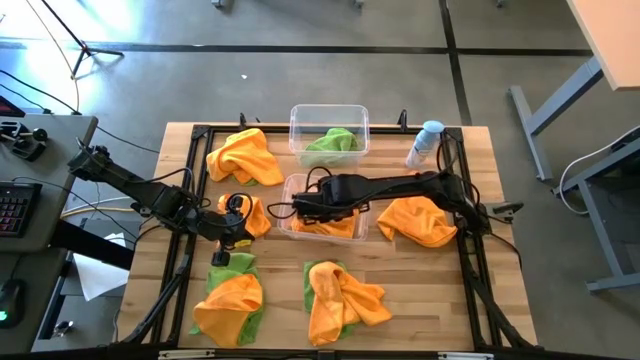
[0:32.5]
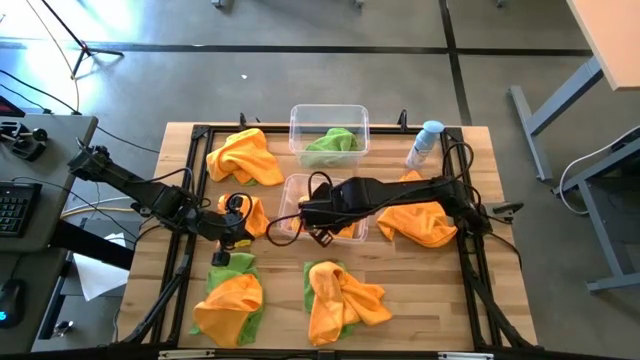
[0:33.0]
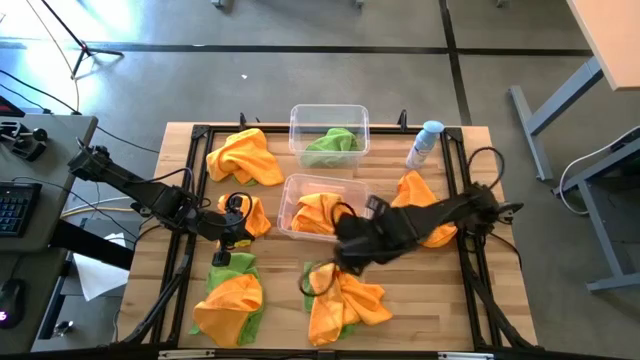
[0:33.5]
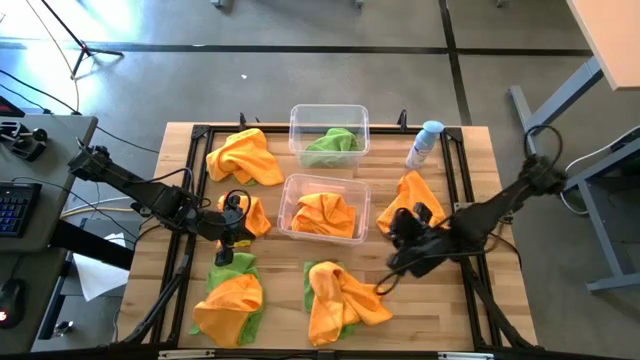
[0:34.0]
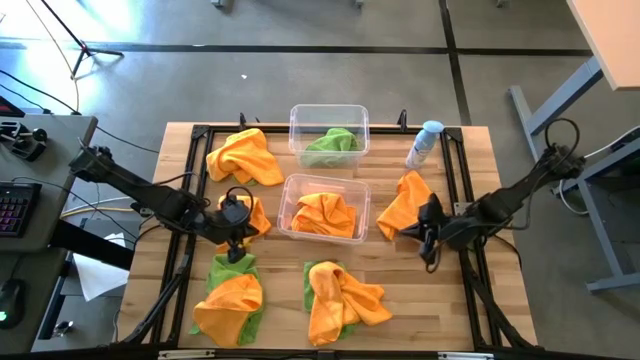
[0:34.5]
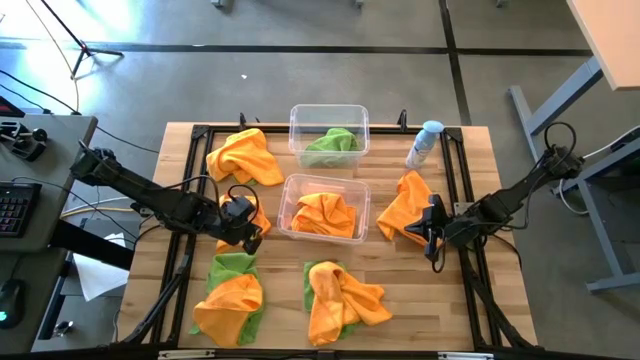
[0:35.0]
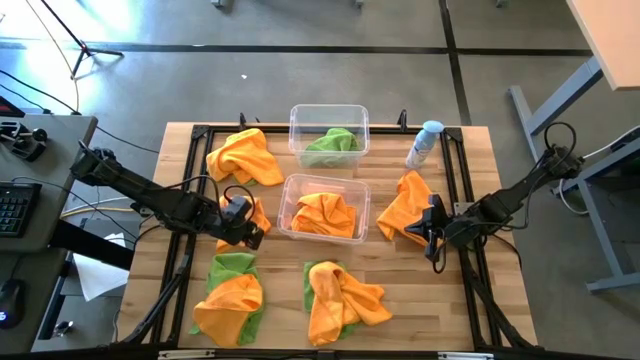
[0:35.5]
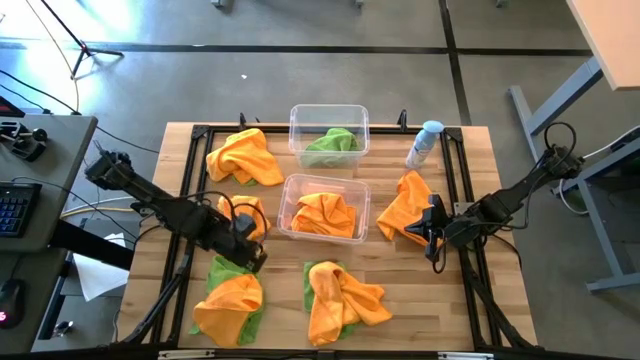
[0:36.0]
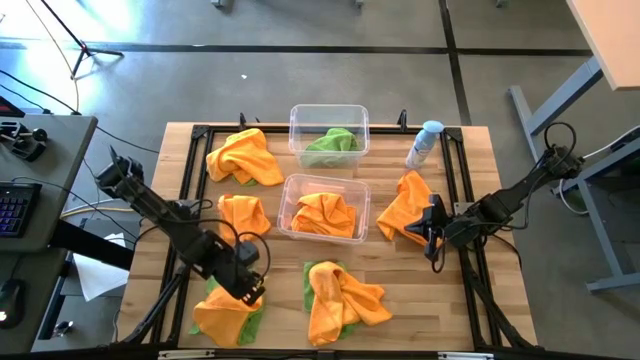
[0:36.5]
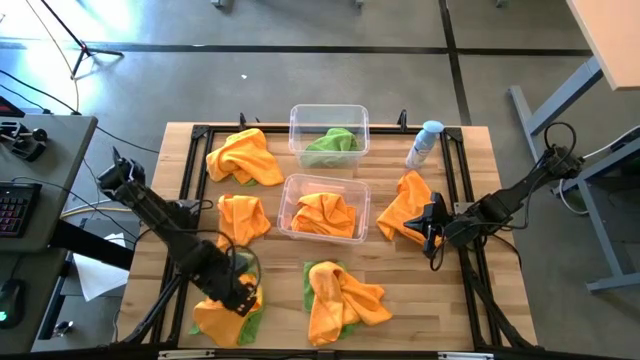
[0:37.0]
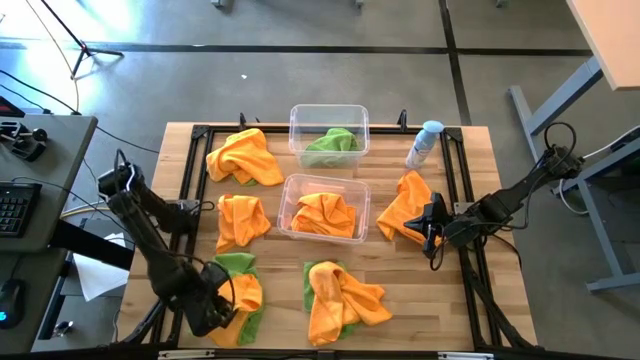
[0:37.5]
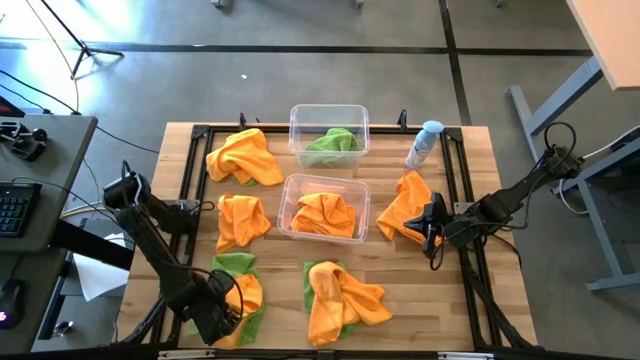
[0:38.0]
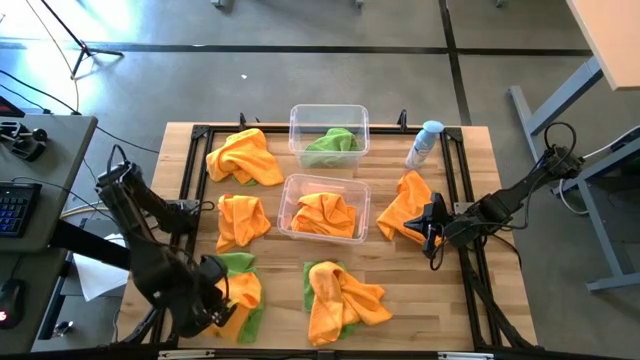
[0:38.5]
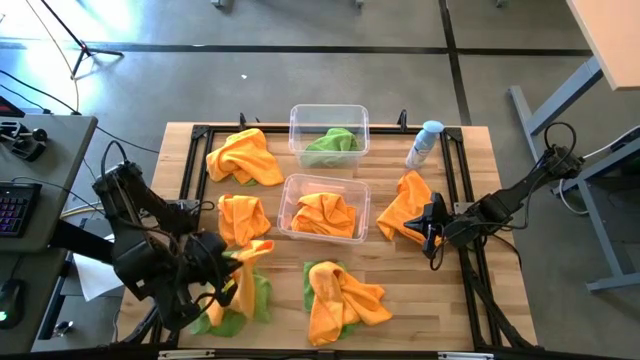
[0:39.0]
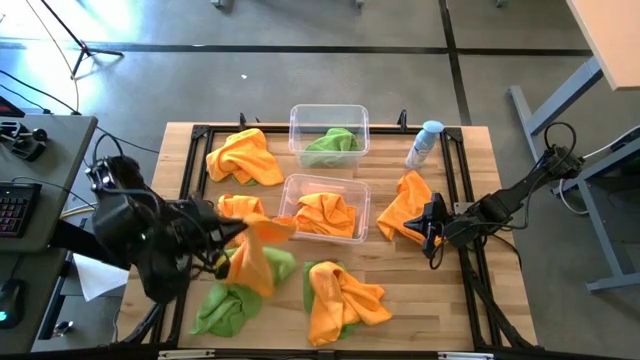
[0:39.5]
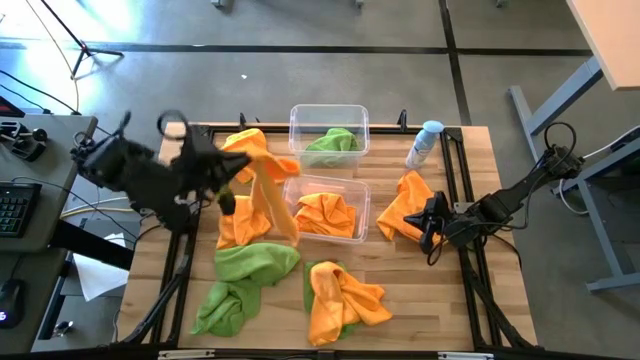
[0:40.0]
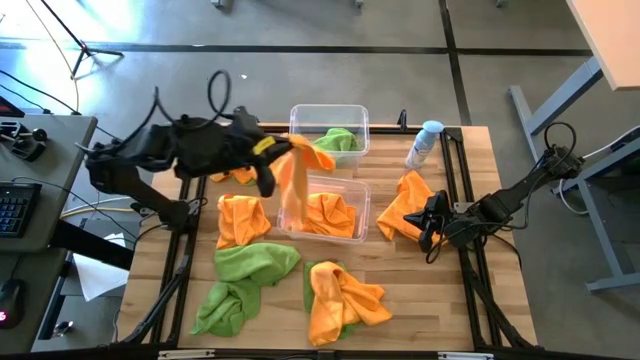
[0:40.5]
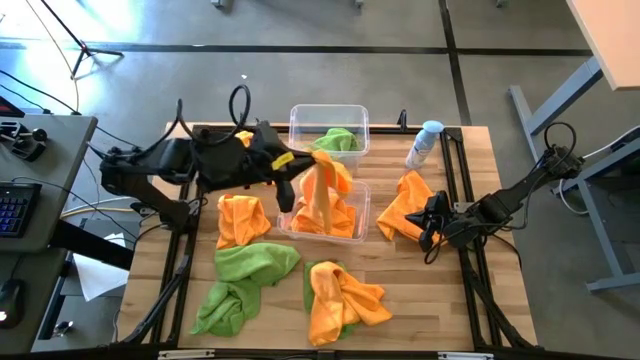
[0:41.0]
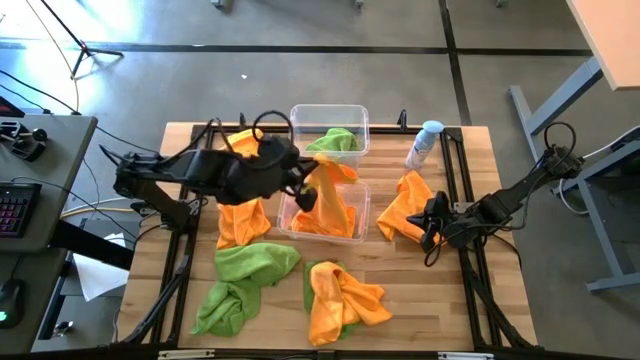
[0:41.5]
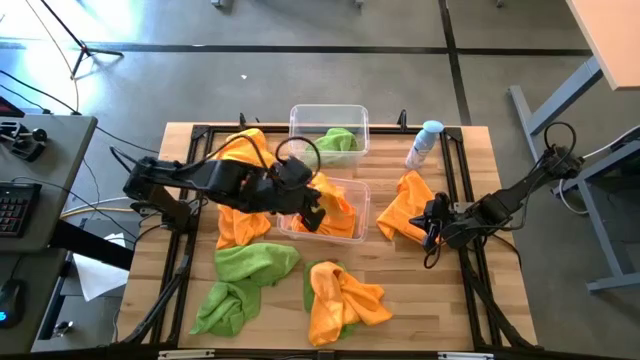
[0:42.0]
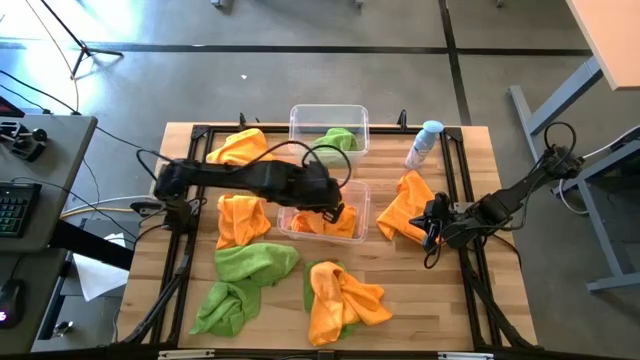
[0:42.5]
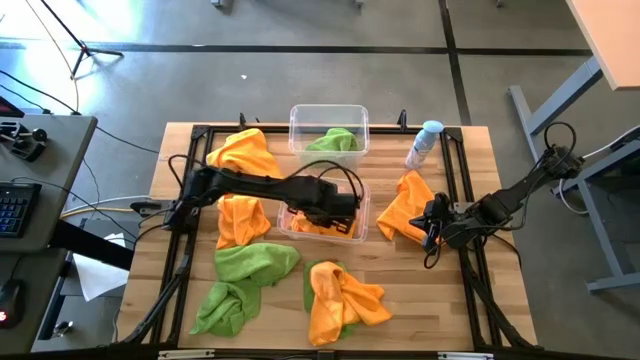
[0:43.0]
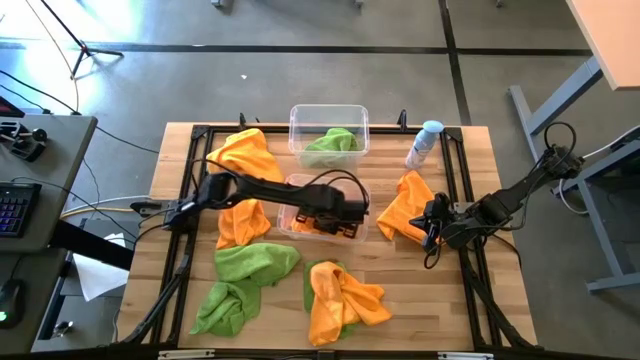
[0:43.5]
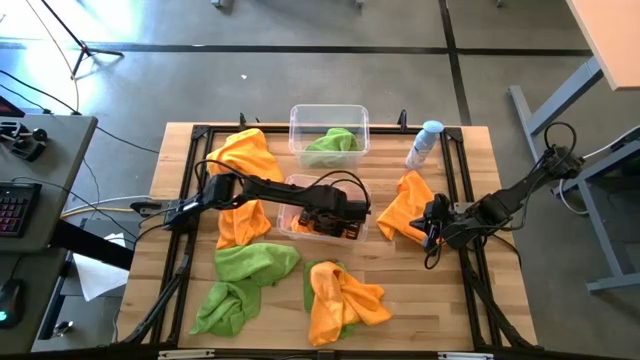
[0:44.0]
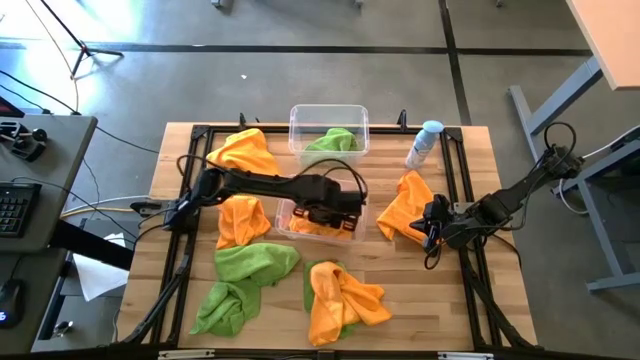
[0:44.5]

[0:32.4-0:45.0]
Task: Sort microfiber towel by color & place in baskets
Put the orange microfiber towel into the bottom transparent bin

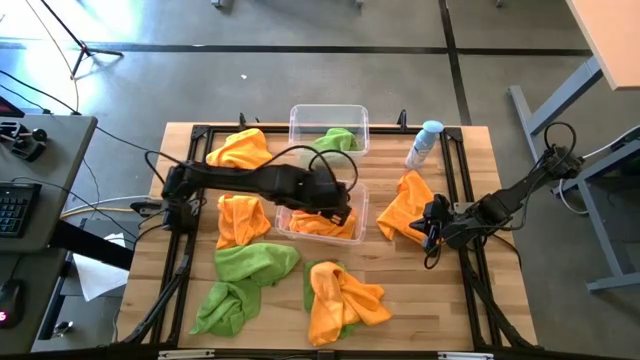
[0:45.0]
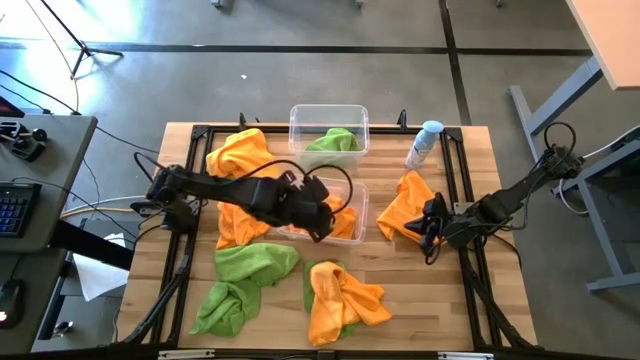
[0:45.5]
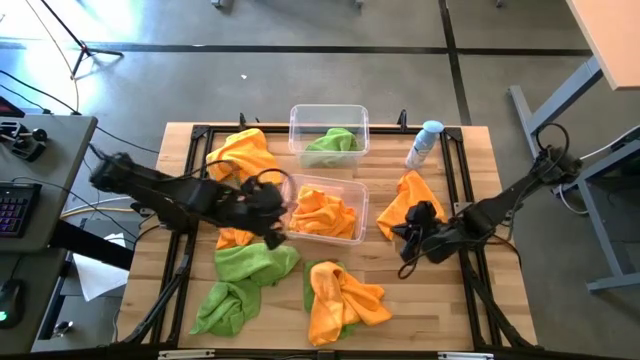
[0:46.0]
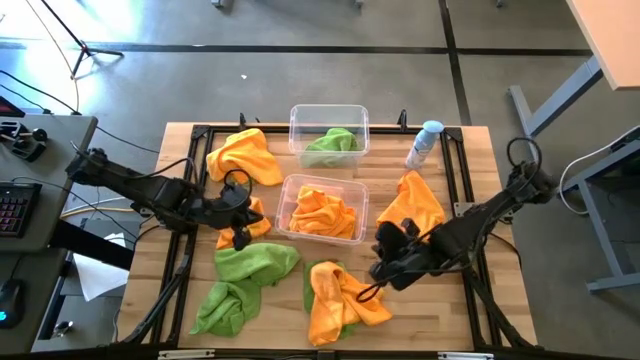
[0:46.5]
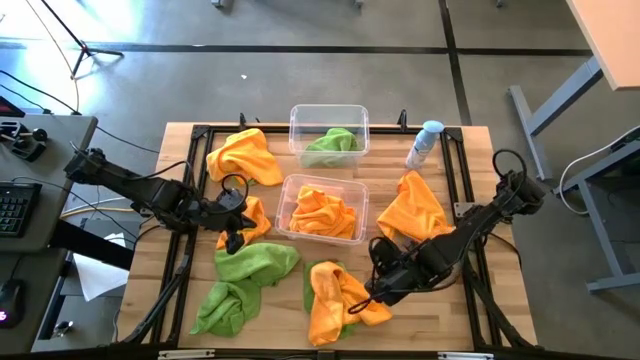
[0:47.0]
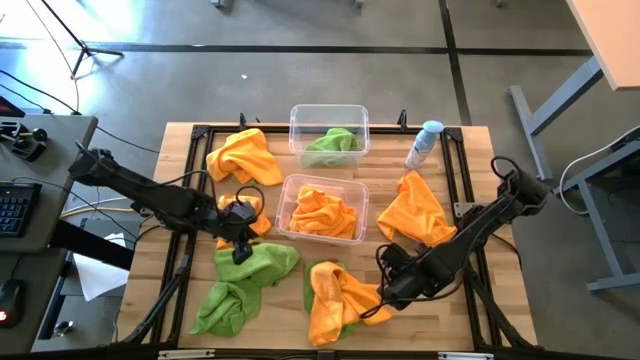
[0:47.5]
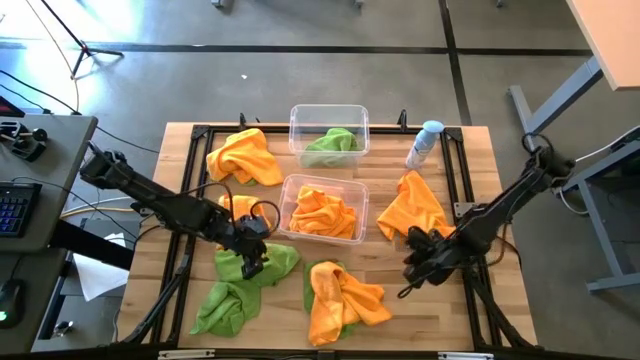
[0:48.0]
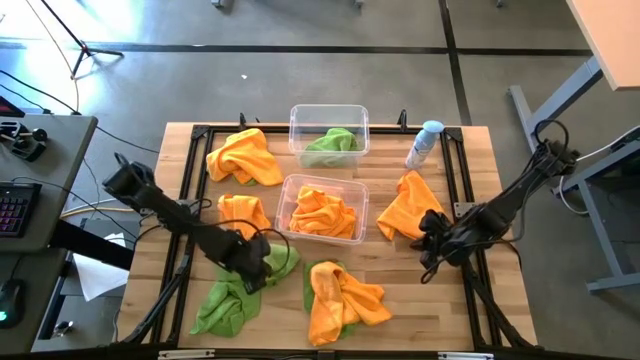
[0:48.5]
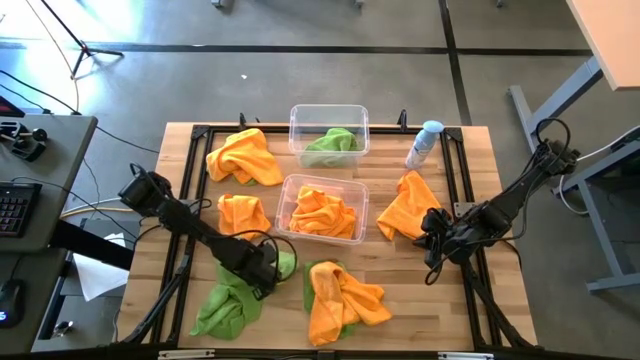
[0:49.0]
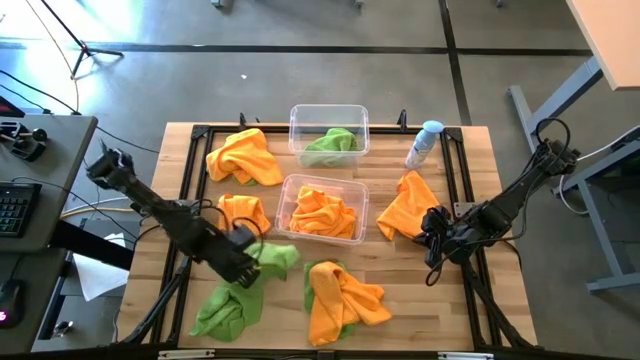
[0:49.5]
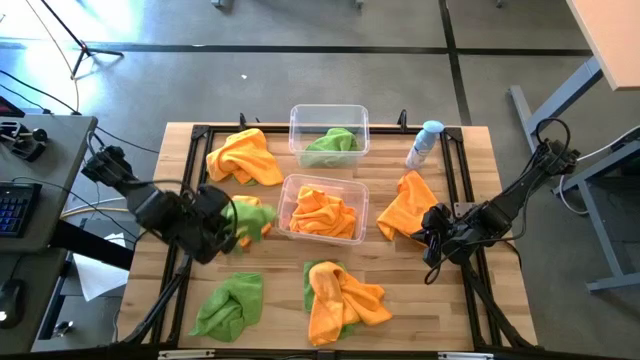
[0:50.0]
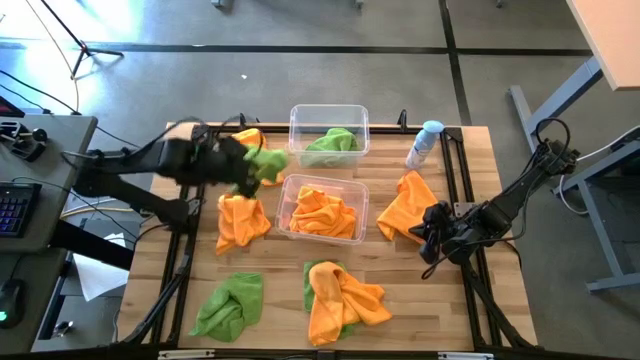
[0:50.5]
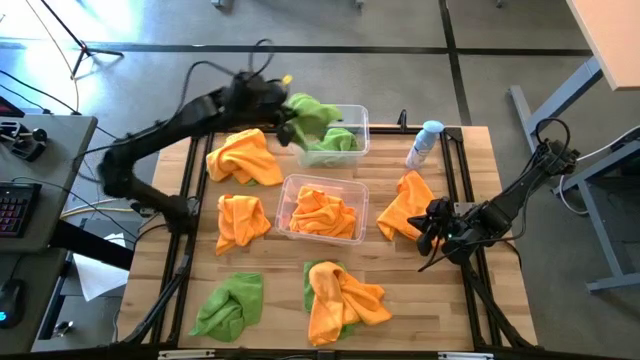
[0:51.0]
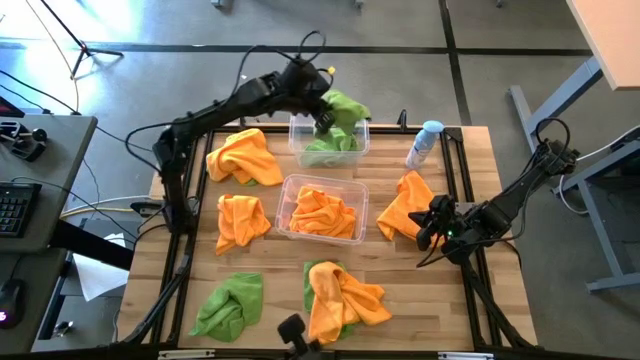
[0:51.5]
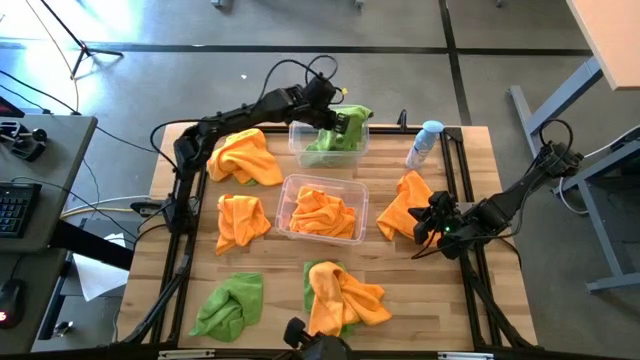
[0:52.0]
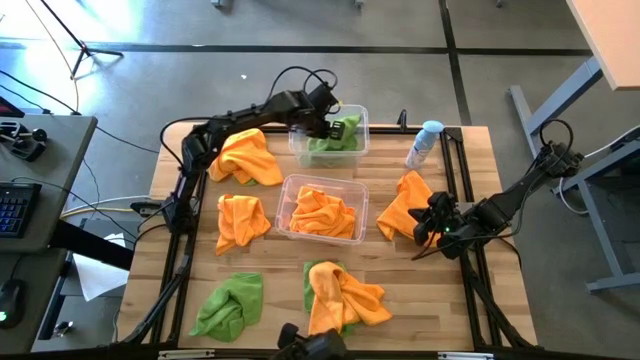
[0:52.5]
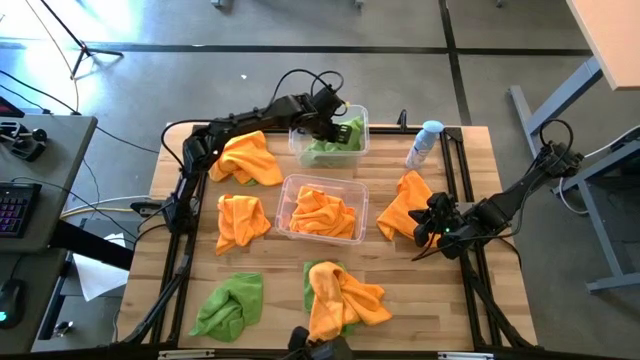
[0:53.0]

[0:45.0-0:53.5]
Put the green microfiber towel into the top transparent bin
